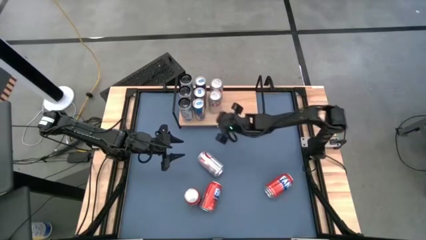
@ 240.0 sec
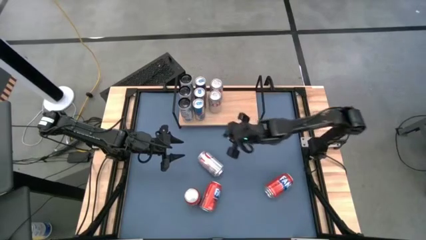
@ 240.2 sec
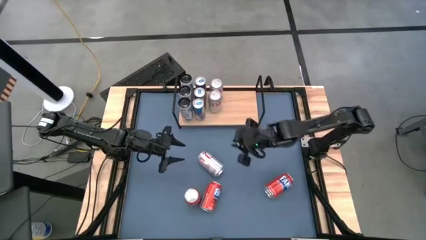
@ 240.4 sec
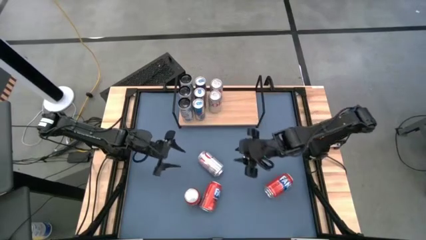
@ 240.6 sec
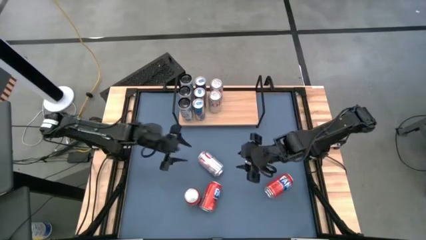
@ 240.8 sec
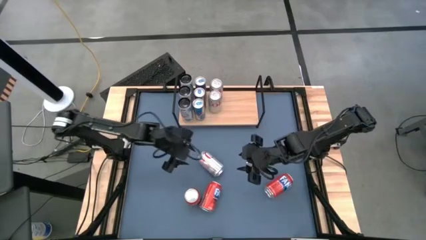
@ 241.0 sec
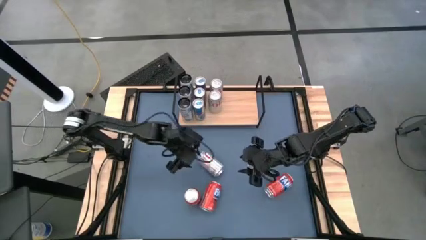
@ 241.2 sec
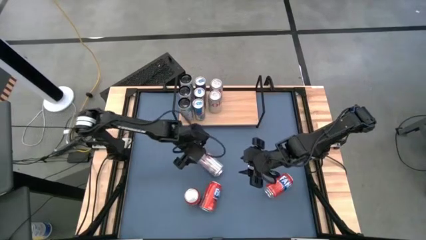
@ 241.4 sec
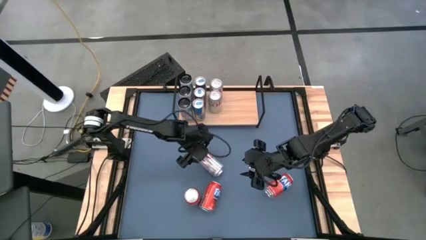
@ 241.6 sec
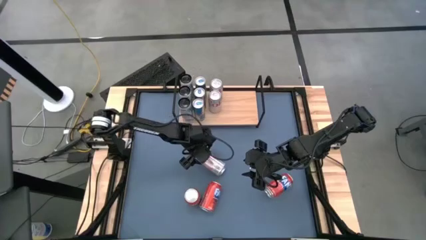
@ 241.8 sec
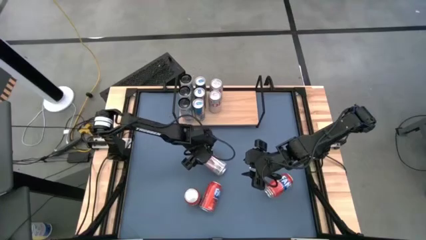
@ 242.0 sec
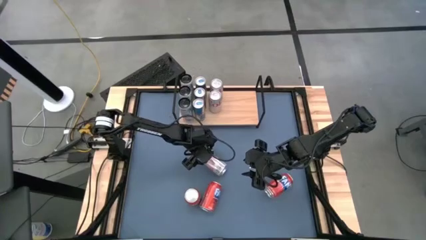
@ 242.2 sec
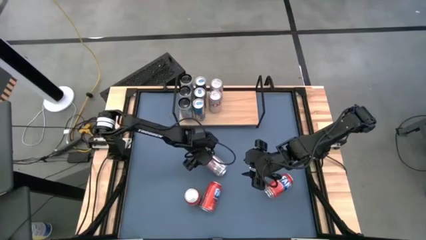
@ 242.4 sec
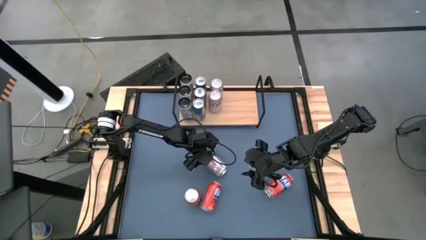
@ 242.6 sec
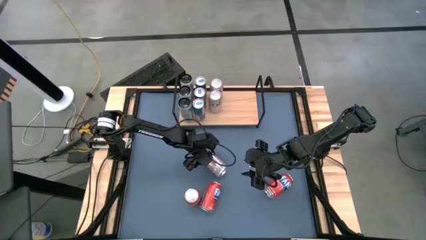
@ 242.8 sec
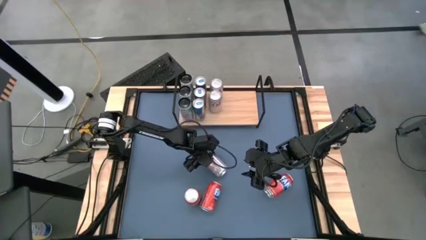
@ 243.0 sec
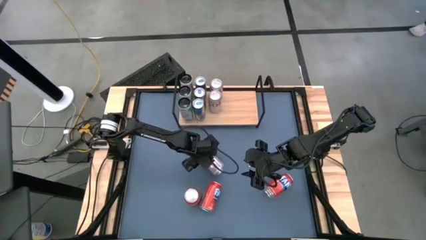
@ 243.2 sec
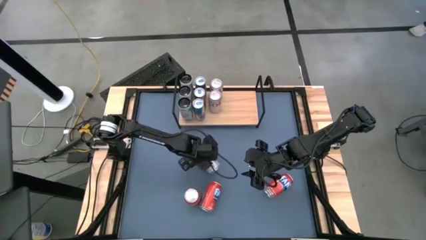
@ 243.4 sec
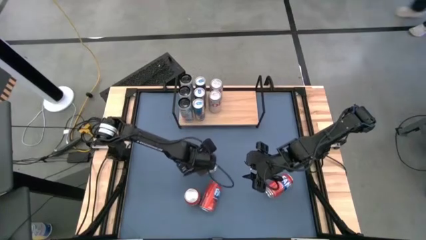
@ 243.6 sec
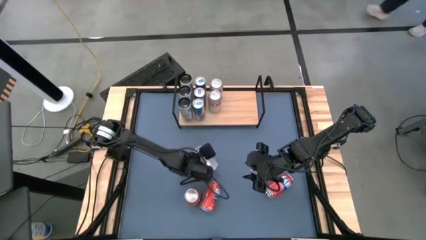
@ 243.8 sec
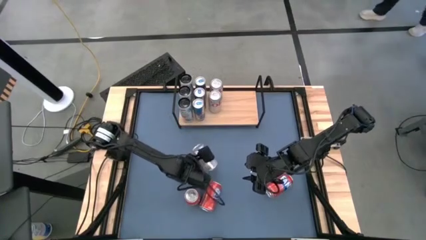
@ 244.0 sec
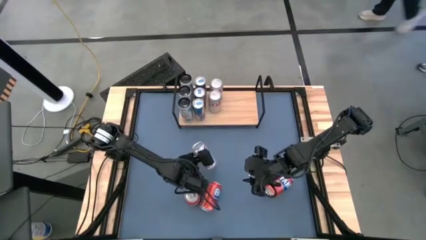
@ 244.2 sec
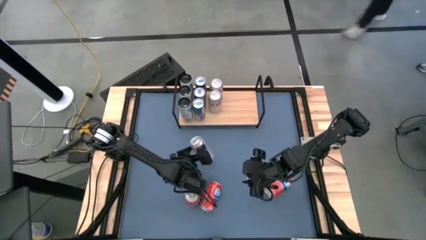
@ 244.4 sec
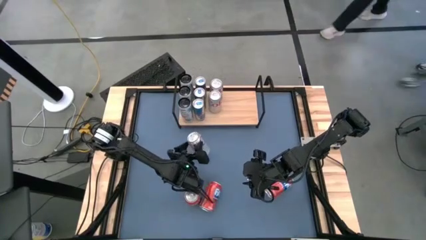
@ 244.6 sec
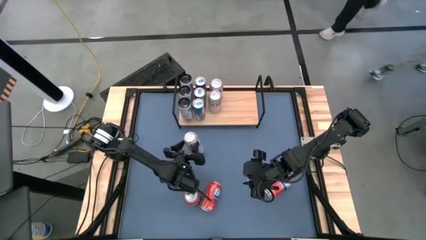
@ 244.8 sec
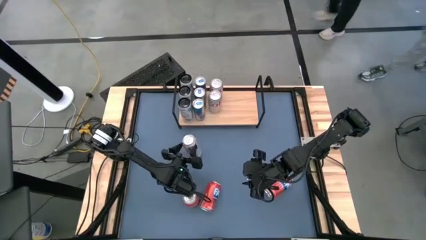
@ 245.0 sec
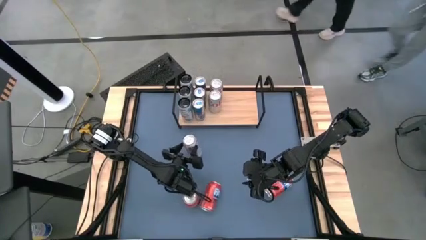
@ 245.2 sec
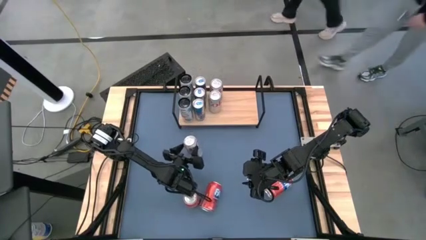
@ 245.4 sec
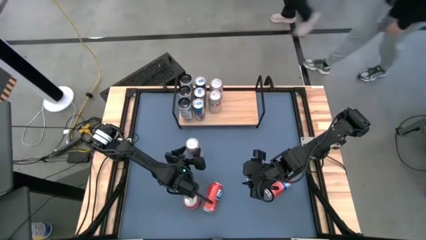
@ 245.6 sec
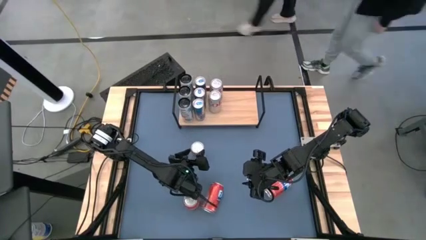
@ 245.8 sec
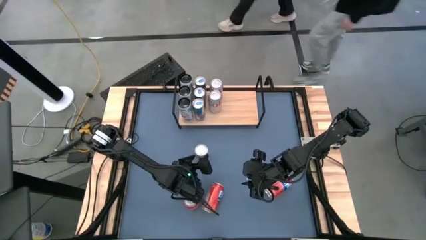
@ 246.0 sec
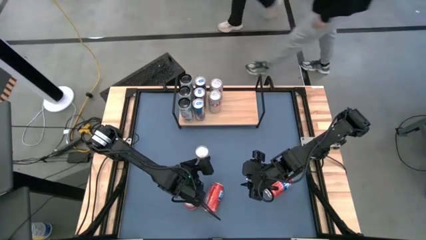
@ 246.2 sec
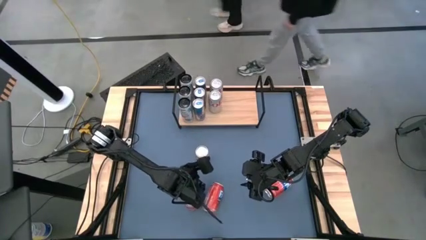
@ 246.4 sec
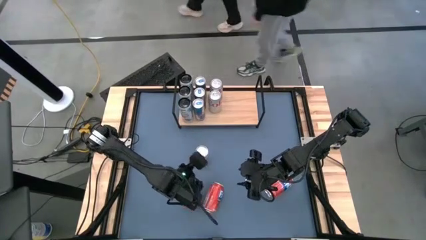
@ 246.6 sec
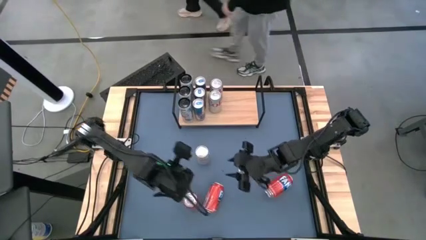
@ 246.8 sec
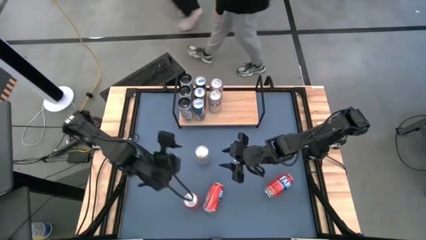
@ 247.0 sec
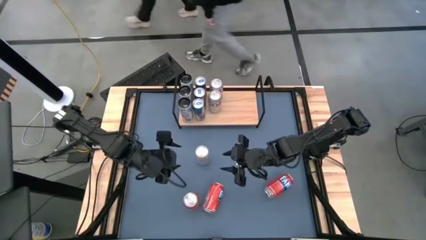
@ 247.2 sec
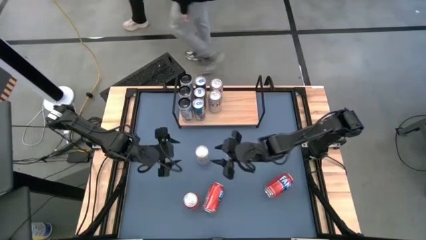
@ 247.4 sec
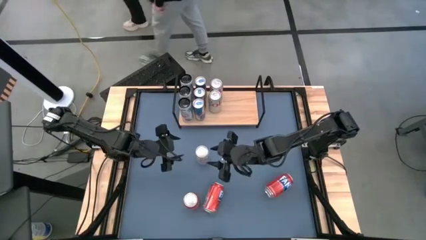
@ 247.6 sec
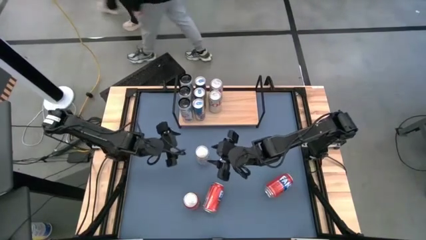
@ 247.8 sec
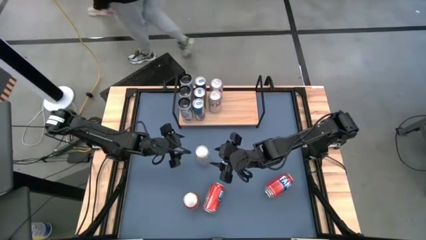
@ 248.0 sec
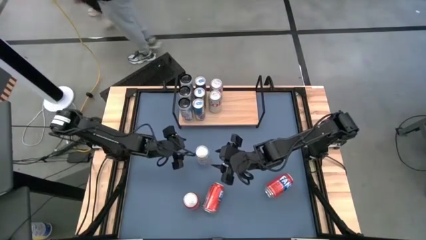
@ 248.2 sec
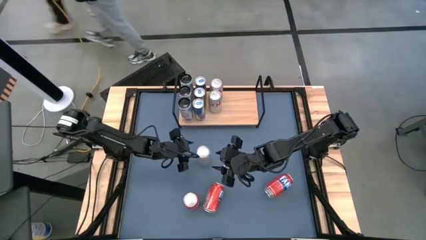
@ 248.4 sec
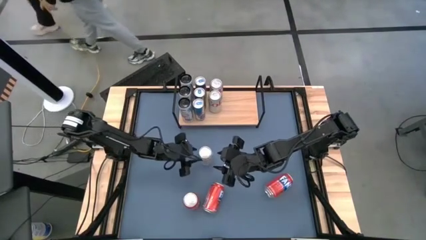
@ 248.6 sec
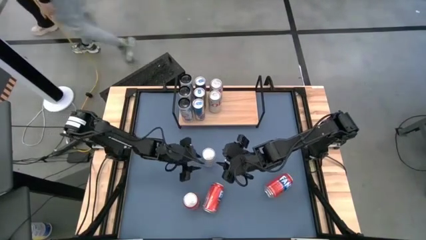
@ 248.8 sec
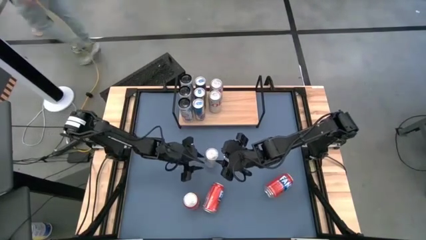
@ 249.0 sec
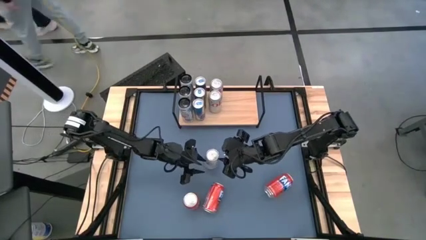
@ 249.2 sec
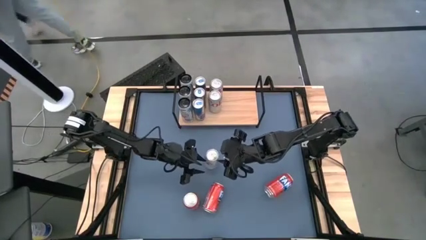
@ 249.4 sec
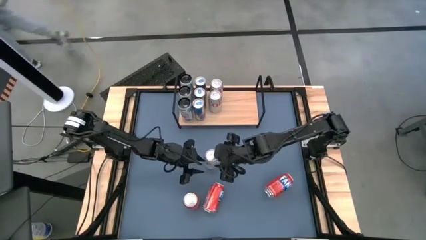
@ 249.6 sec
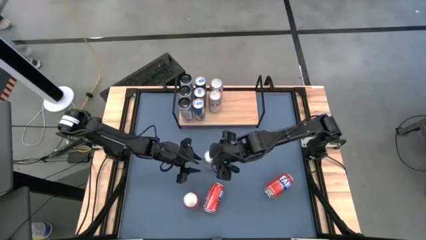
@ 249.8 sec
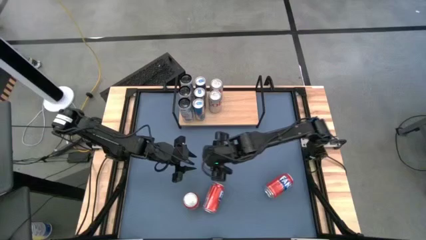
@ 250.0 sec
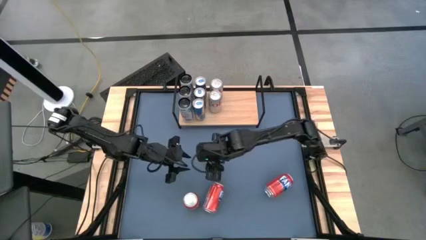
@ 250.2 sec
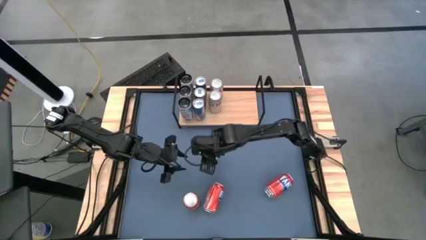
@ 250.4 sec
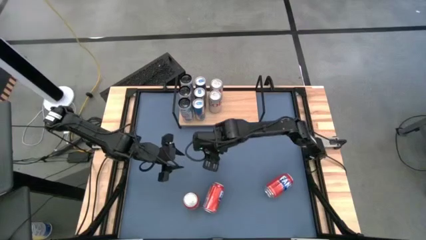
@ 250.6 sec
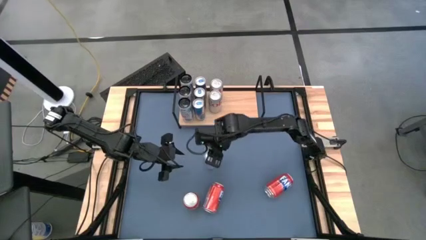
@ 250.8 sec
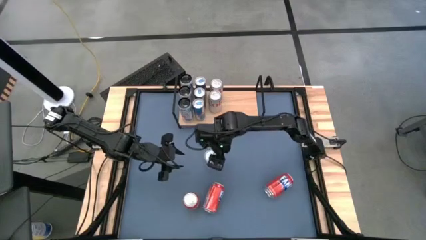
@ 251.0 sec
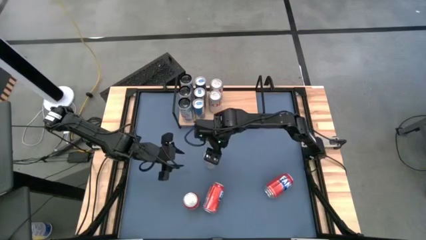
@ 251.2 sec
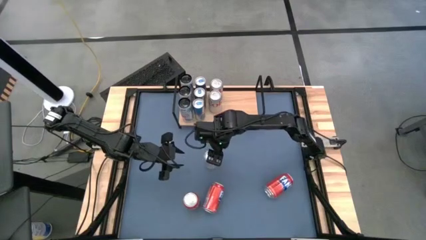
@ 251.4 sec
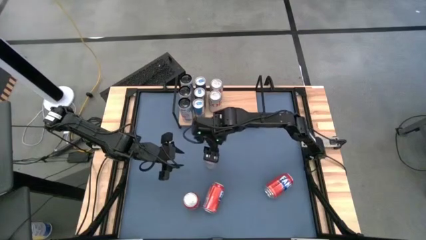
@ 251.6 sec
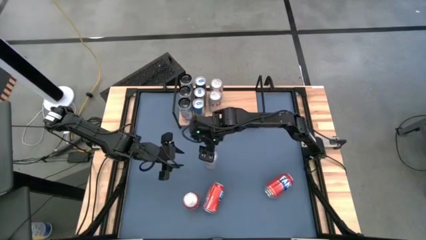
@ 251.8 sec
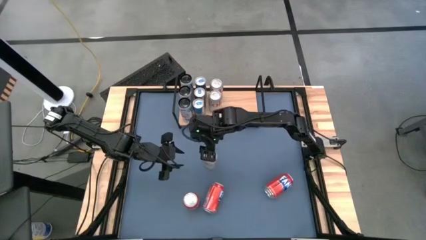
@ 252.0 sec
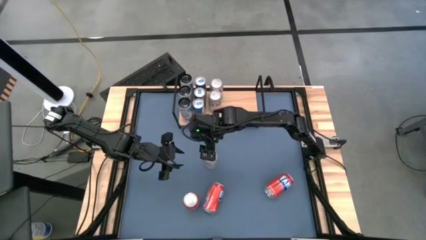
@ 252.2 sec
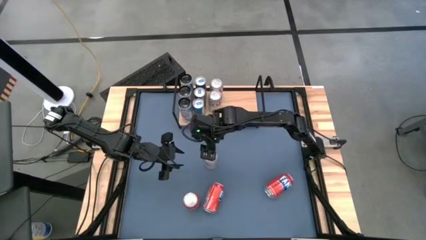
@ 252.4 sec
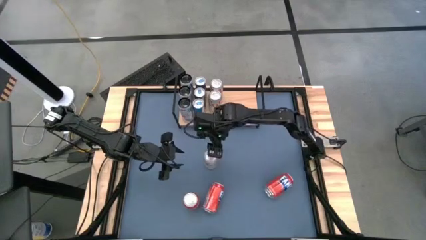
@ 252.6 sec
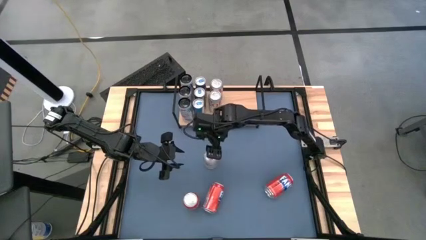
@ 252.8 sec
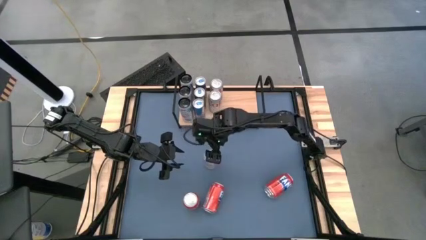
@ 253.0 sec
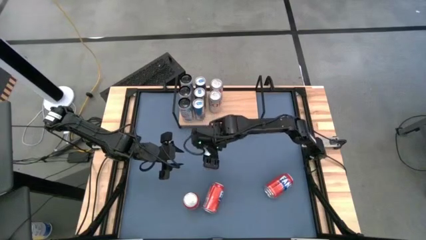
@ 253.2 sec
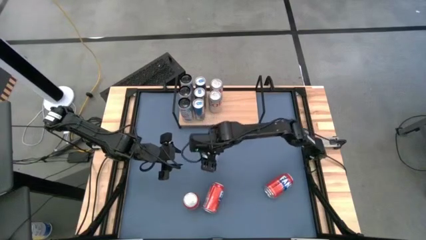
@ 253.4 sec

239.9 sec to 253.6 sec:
Task: Place canned beverage on shelf
Put the silver soda can aligned with the other silver soda cans on the shelf

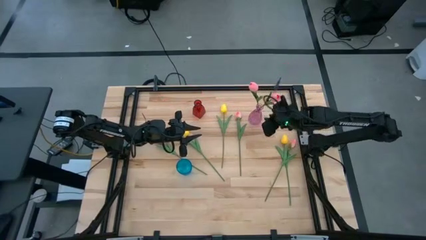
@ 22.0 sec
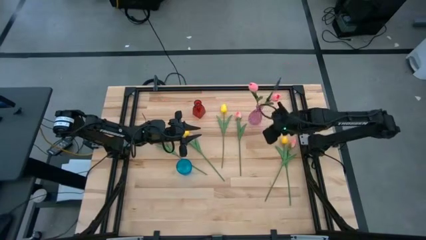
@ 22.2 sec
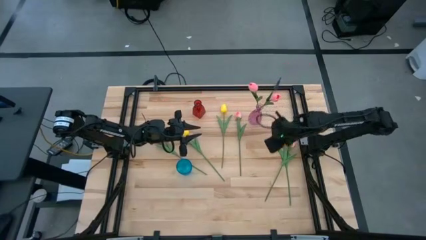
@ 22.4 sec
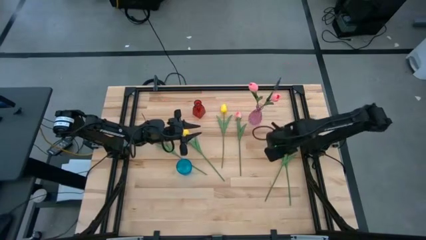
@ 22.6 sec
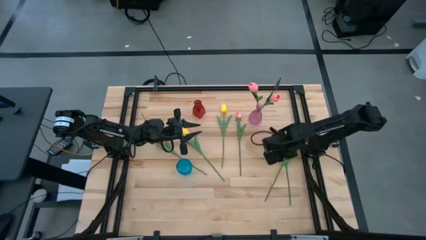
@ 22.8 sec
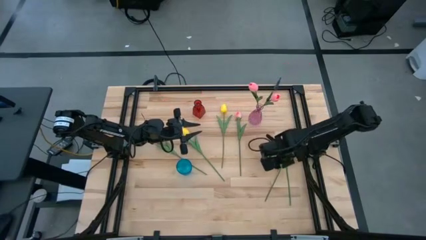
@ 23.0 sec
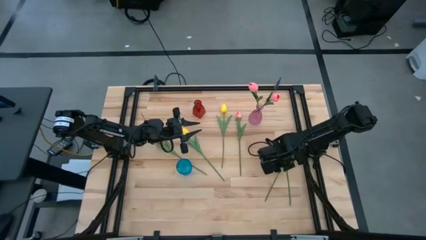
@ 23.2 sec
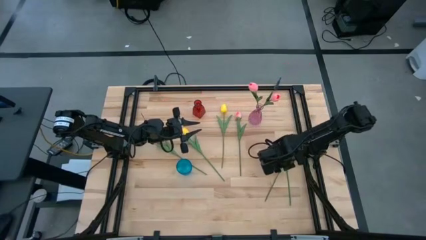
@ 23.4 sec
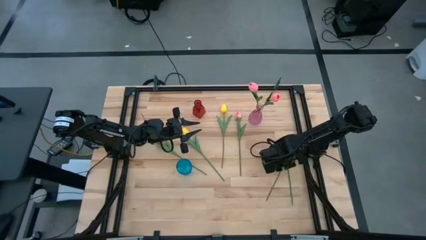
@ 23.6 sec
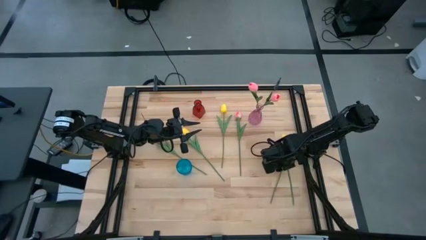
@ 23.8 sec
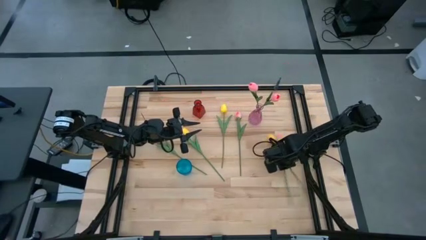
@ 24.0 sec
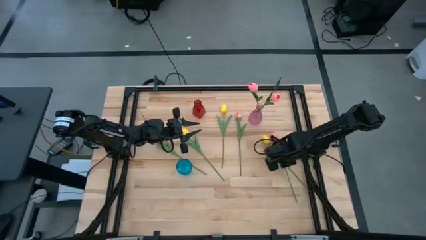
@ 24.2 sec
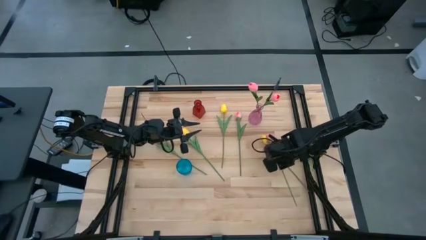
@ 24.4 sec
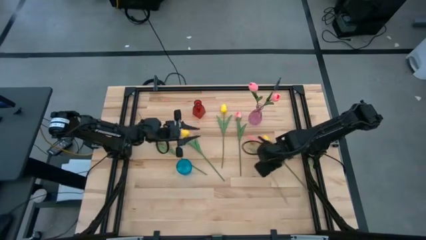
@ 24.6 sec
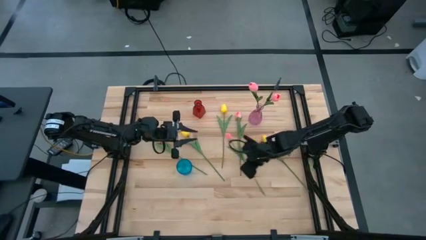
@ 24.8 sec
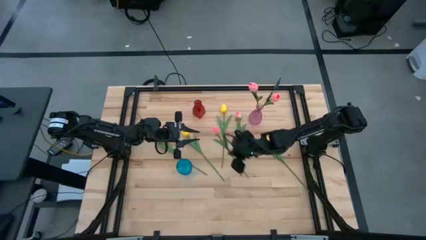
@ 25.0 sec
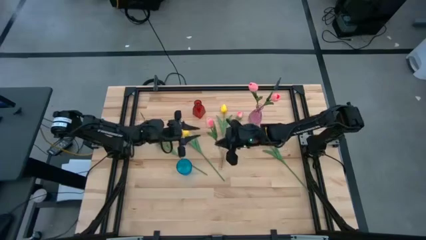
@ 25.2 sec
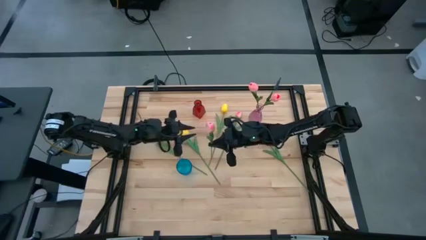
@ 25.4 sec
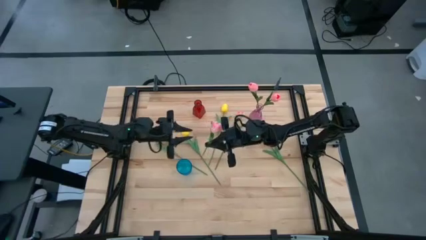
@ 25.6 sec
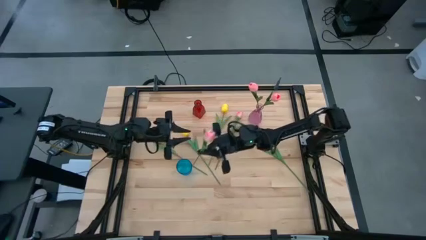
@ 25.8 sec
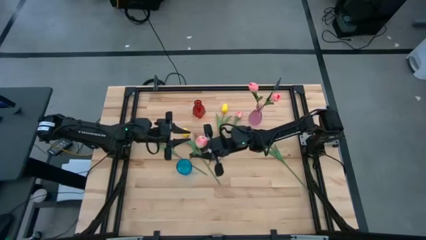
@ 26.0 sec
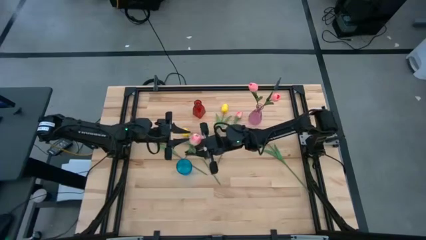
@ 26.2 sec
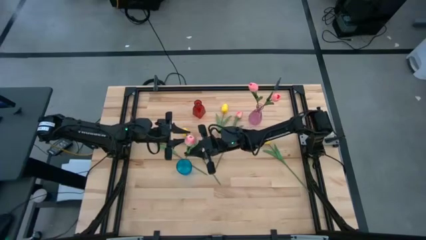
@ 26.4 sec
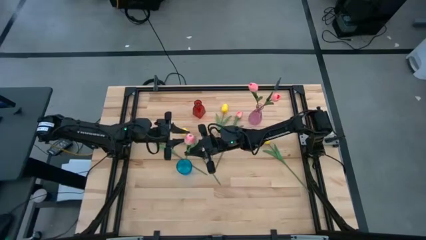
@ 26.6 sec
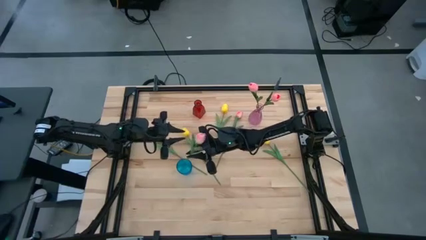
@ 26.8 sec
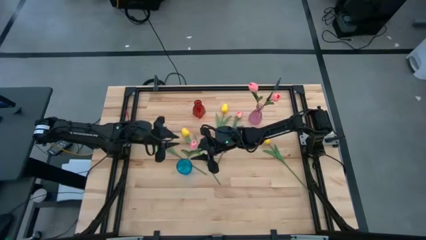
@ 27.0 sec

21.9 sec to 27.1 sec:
Task: Sort flowers into vase by color
Put the right light pink tulip into the blue flower vase
